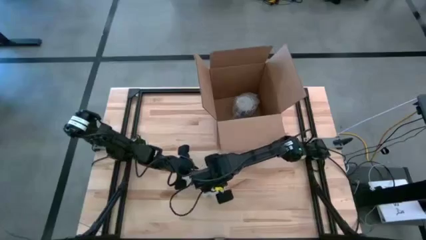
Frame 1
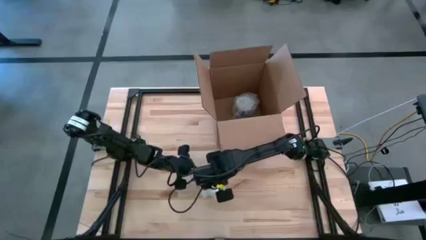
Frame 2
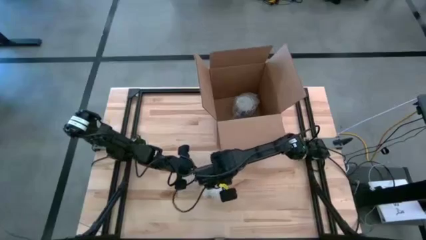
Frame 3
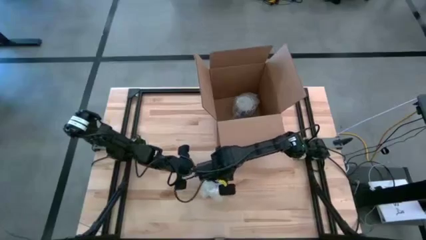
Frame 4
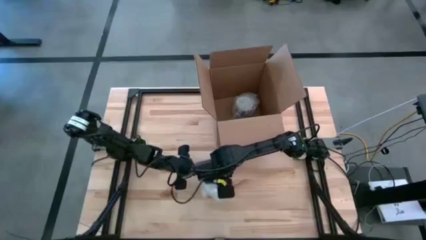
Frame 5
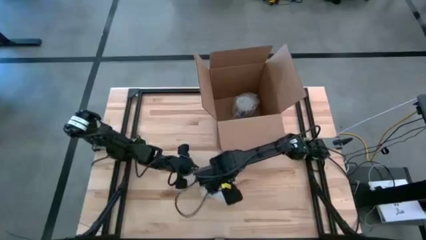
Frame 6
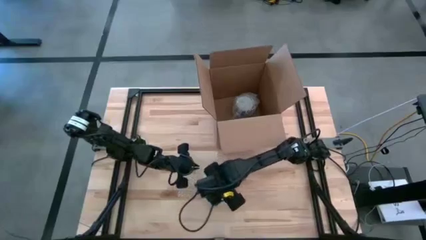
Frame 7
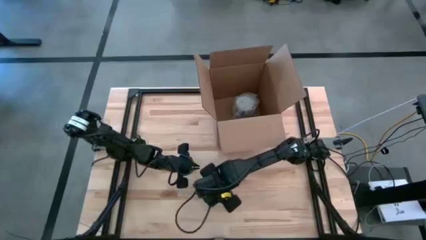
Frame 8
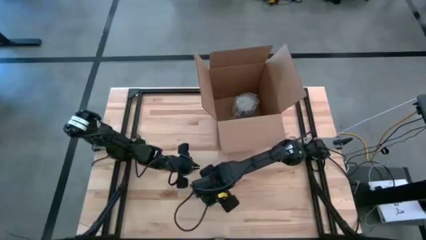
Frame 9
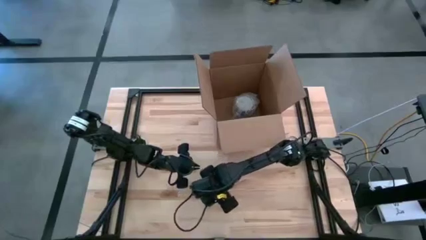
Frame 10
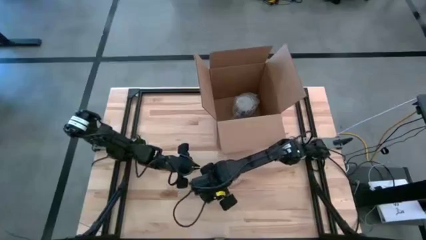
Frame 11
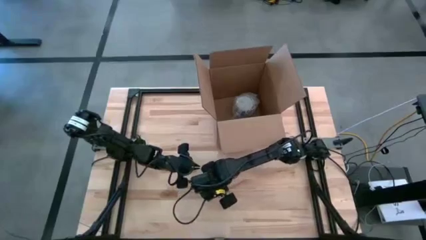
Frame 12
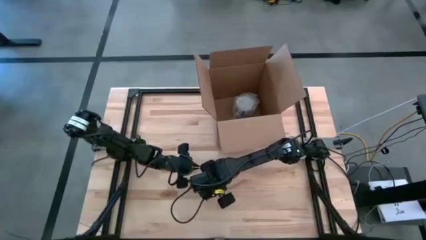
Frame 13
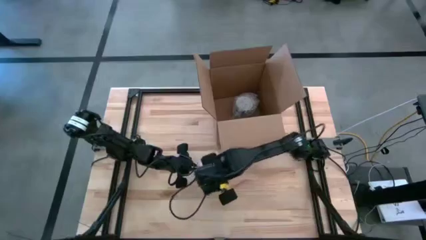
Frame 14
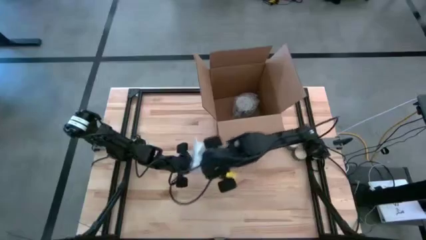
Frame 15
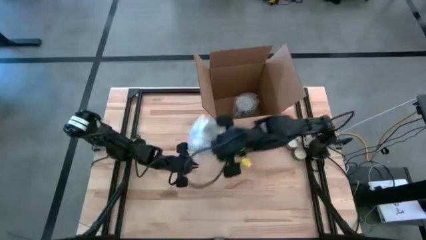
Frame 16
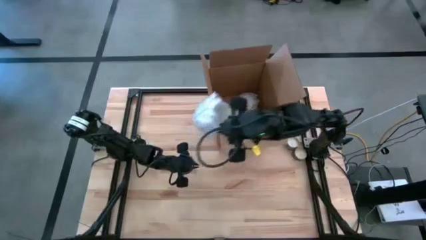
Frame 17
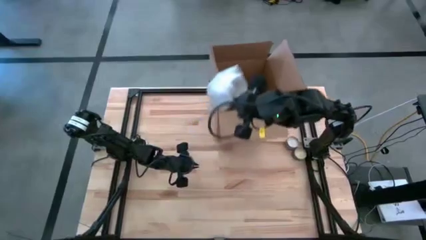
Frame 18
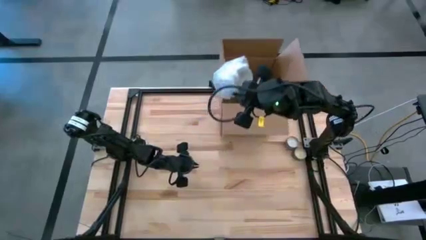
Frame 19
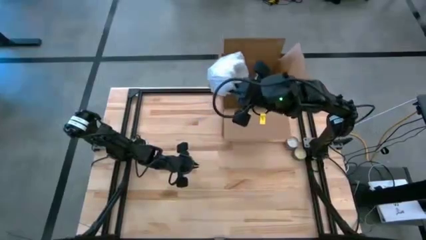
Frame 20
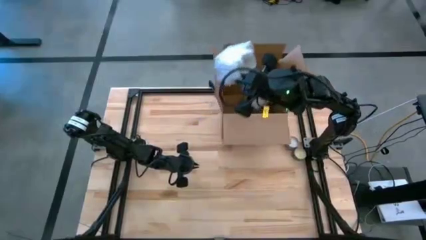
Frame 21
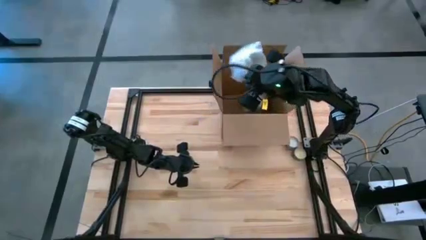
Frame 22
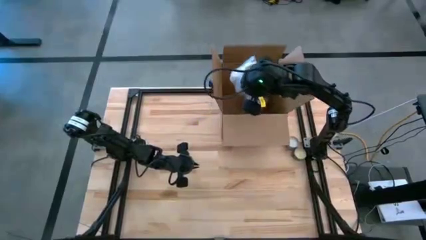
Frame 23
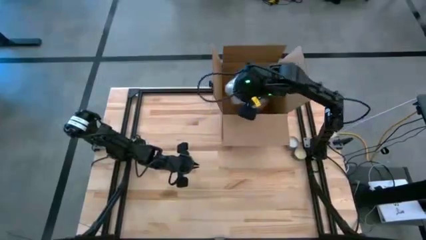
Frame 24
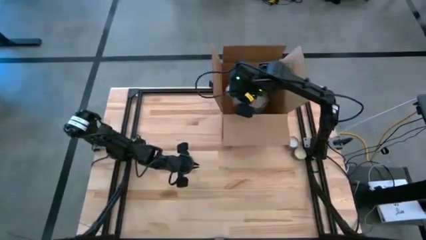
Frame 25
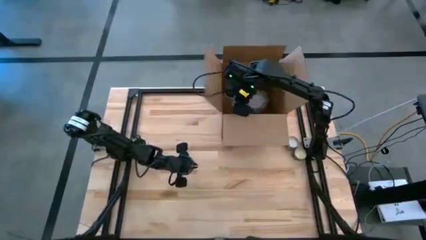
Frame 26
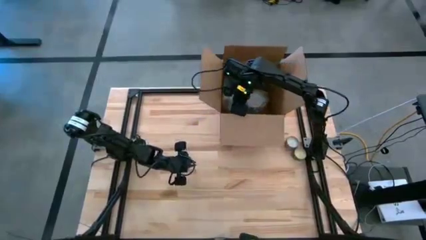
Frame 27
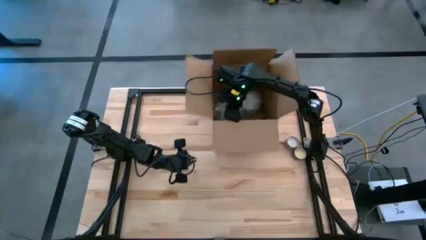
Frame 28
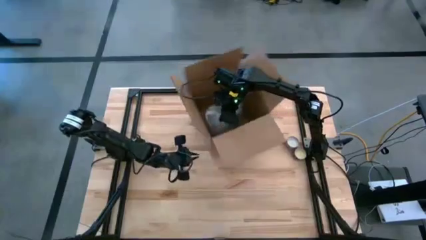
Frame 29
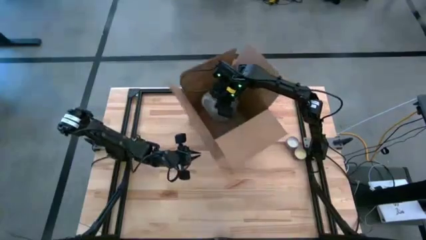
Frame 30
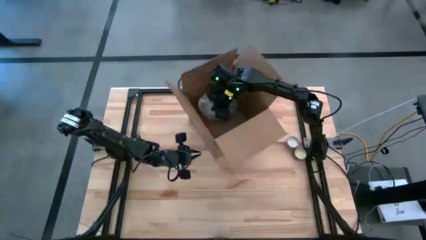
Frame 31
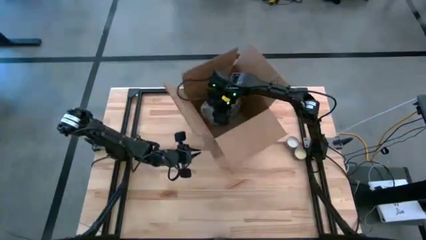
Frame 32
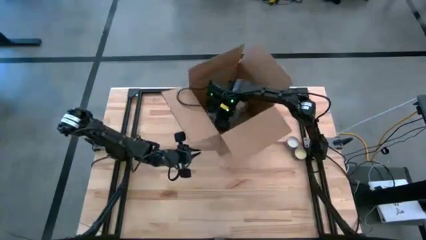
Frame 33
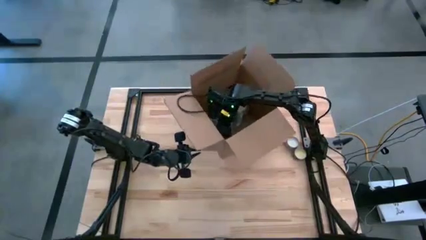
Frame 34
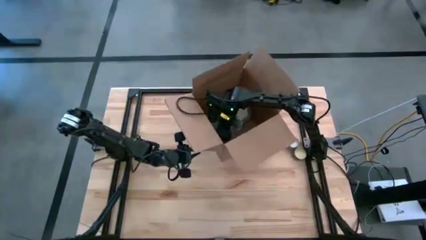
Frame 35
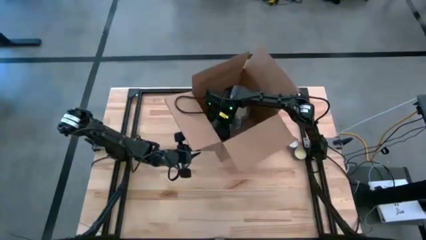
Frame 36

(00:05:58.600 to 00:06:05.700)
Task: wrap mug
Put the wrapped blue patterned mug into the cardboard box

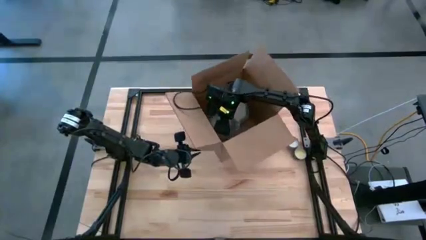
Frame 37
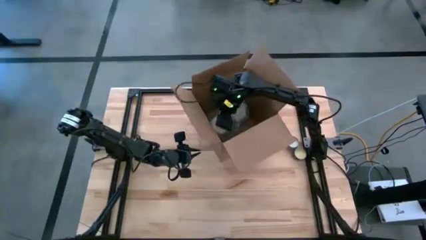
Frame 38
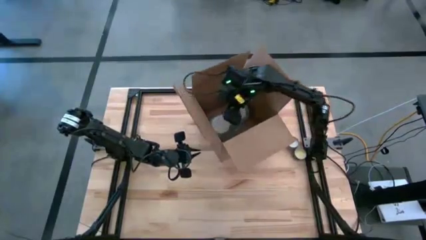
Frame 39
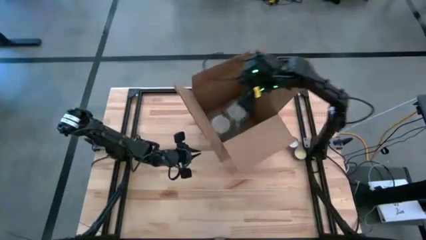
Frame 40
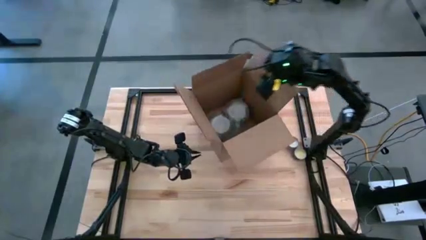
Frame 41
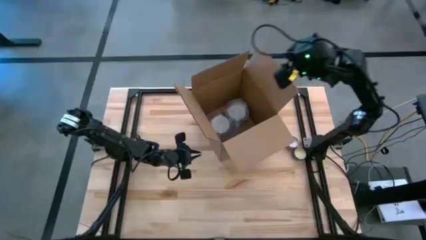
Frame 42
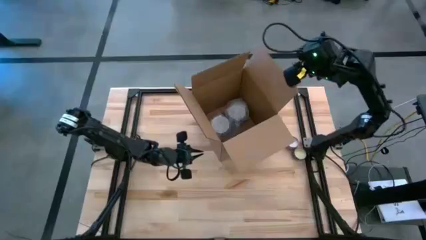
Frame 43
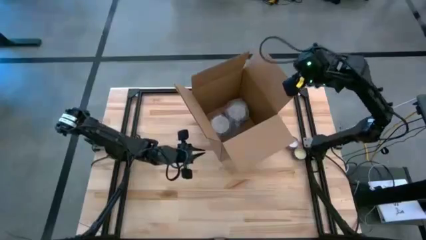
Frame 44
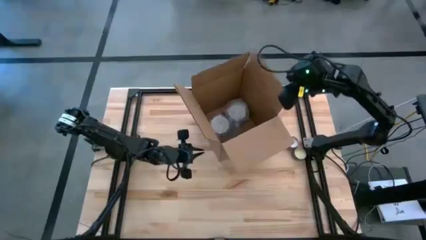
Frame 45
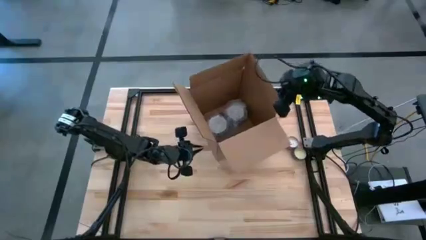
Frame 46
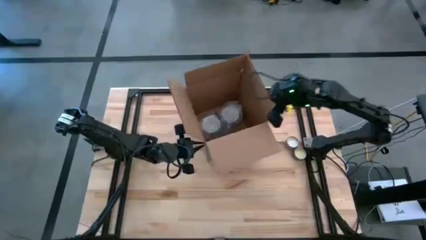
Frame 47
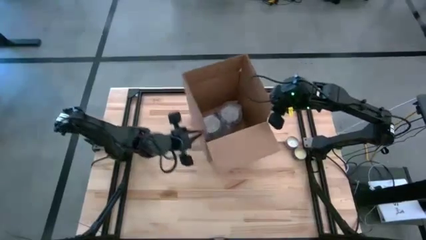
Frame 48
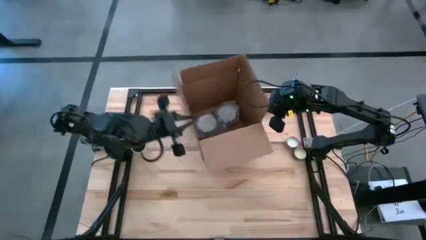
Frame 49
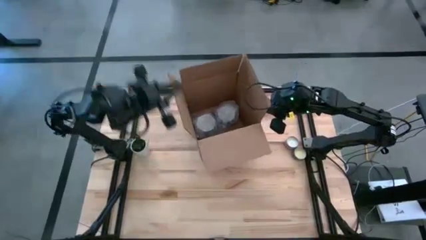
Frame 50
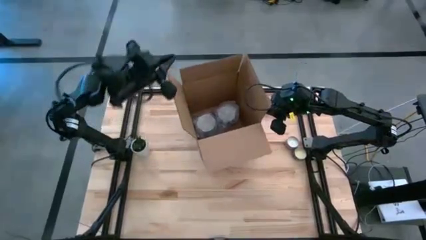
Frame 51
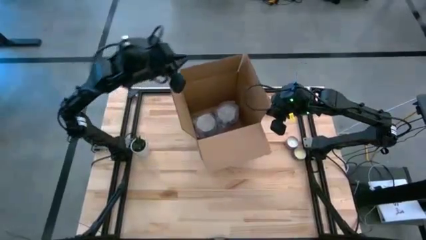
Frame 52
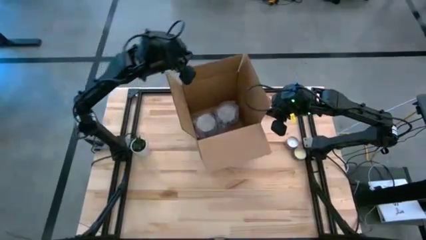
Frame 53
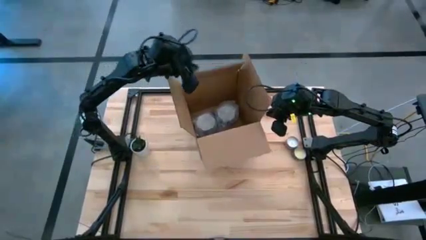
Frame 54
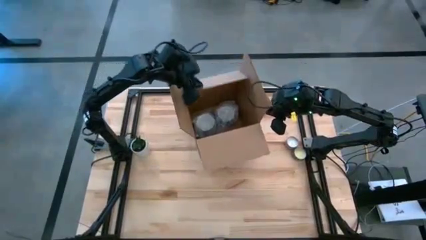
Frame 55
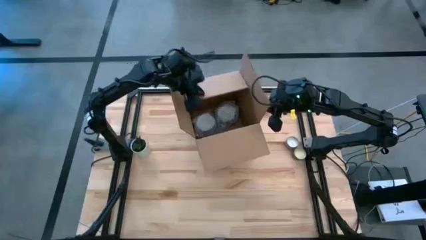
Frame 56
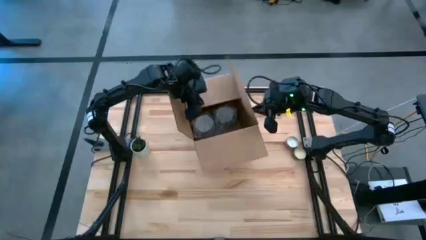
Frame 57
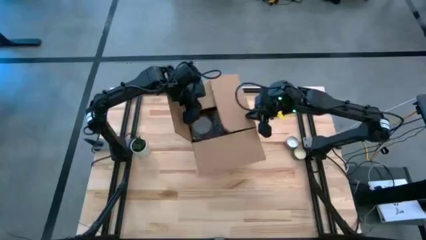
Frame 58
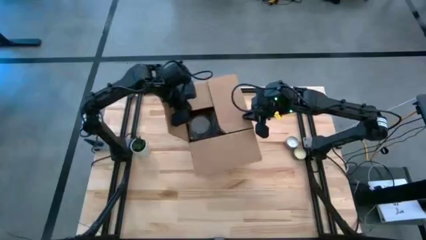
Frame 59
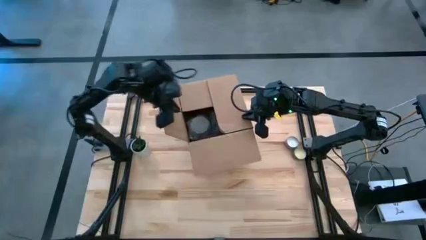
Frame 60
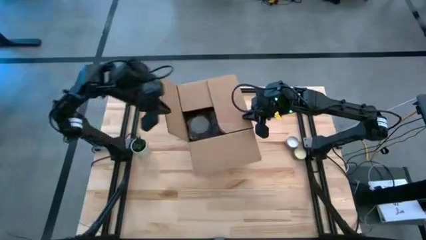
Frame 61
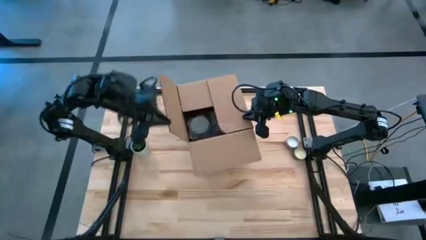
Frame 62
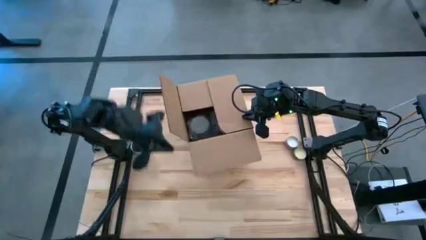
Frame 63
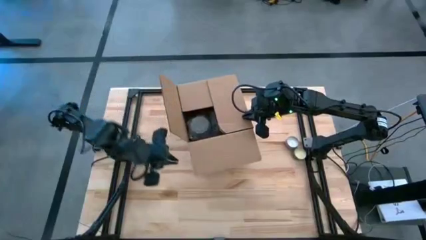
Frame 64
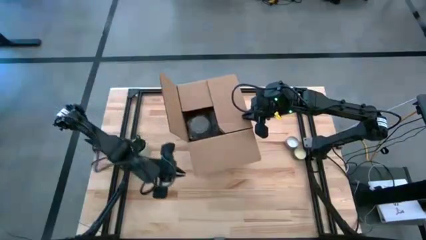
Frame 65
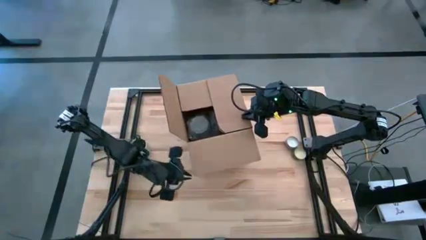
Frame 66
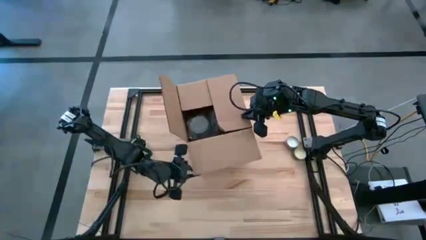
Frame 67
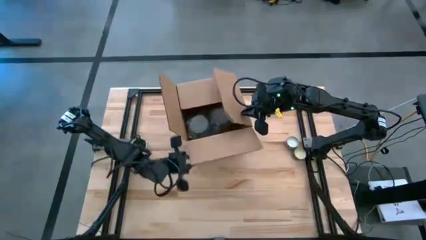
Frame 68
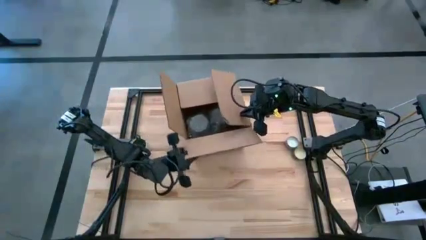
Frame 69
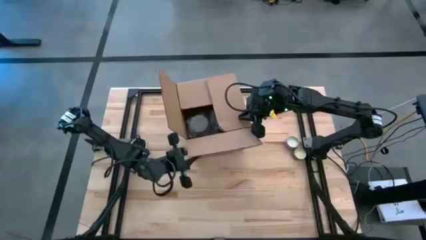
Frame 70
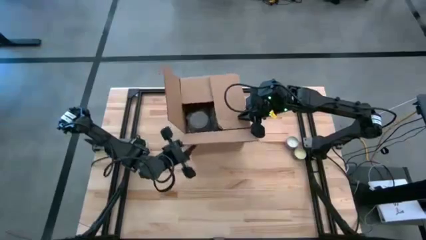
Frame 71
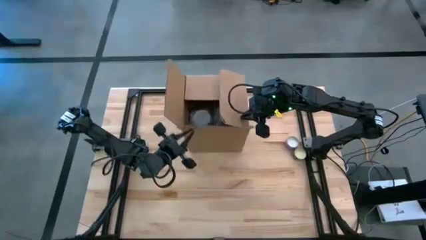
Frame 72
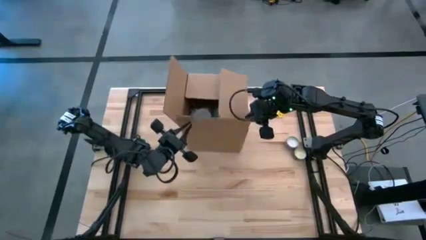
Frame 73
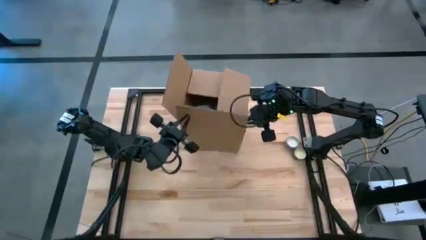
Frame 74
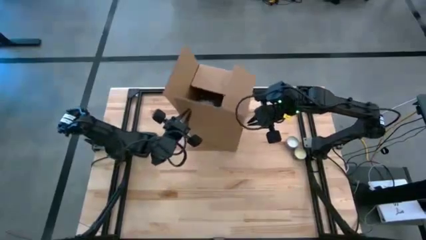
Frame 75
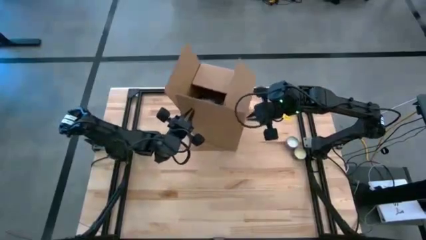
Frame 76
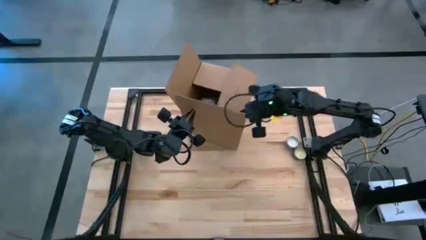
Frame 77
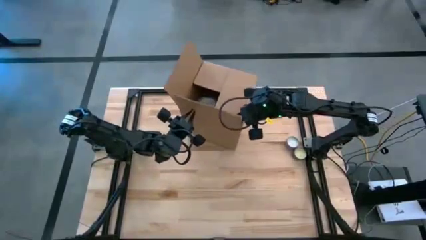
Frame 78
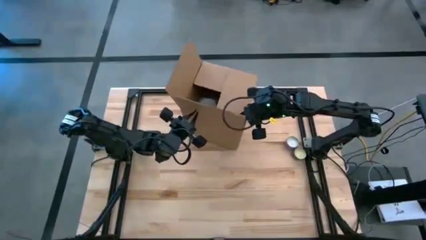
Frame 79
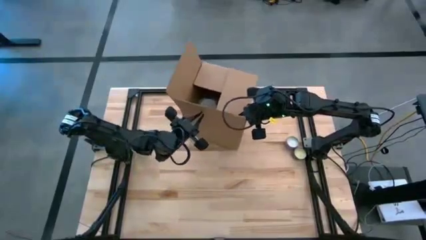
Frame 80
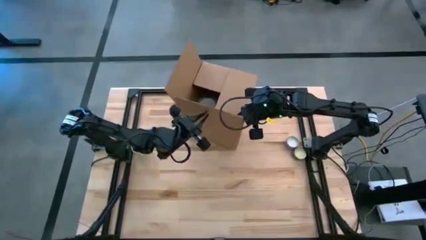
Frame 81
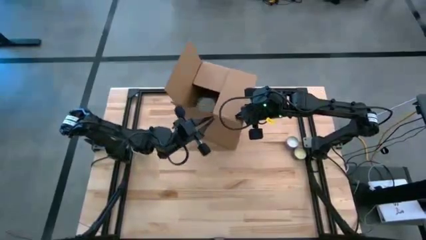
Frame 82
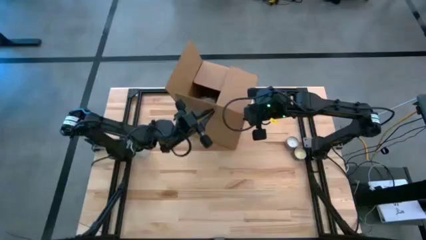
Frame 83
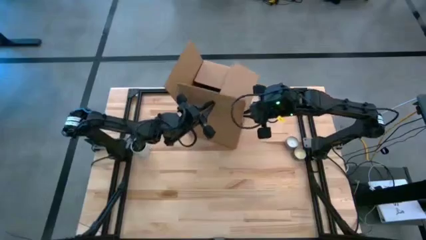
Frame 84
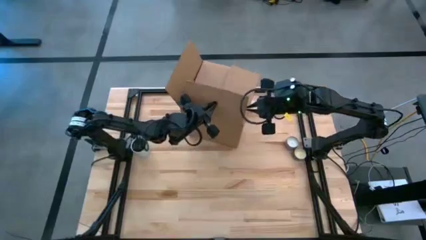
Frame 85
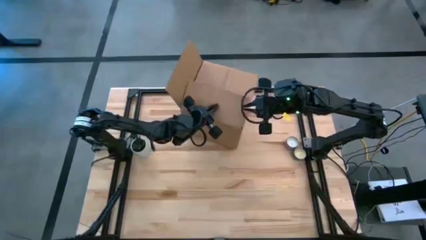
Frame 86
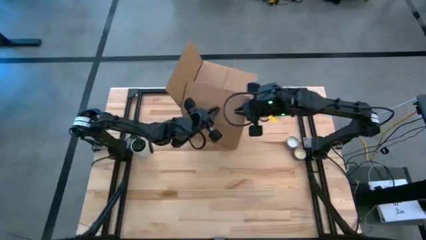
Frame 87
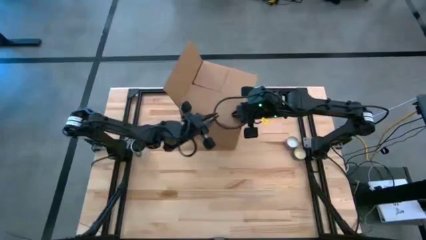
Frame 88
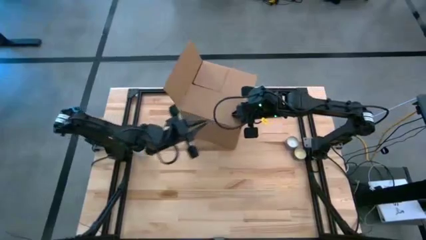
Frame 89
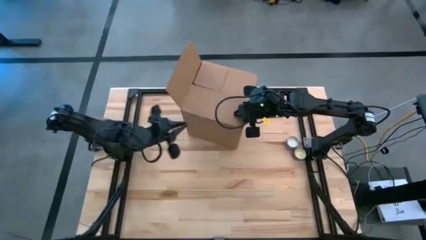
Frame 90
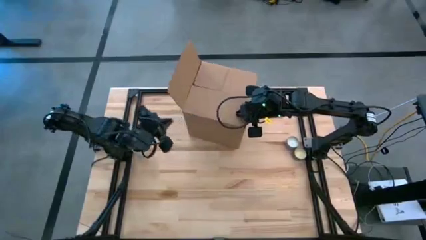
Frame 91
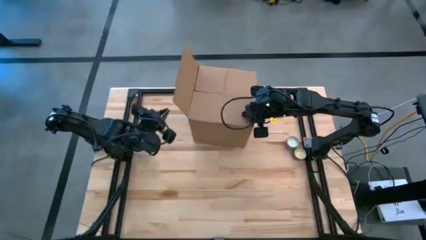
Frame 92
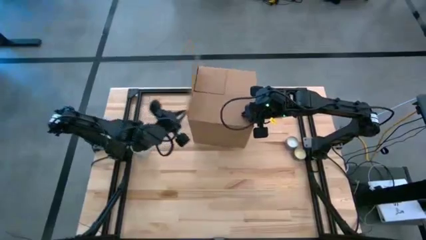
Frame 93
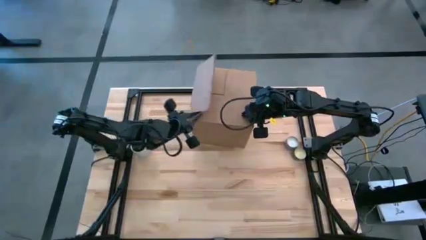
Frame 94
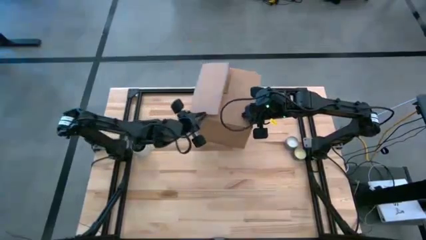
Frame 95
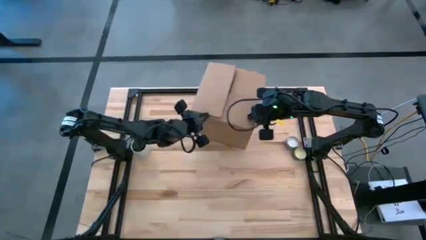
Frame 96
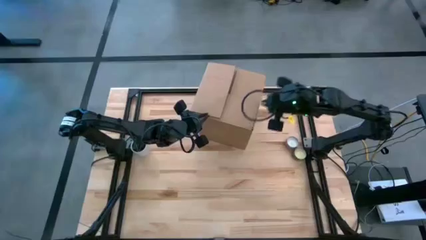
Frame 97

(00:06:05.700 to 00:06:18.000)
Close the cardboard box
